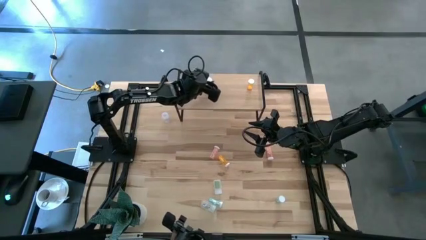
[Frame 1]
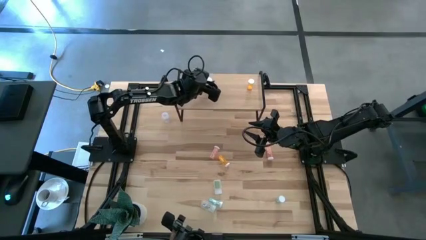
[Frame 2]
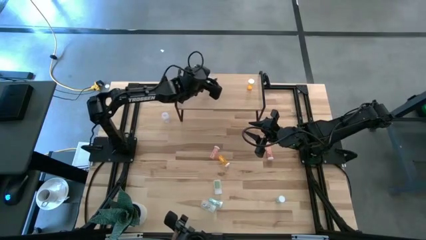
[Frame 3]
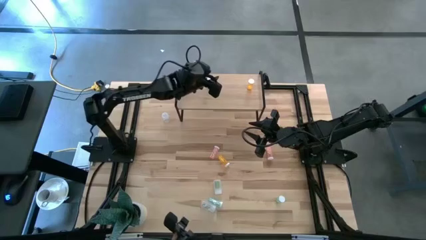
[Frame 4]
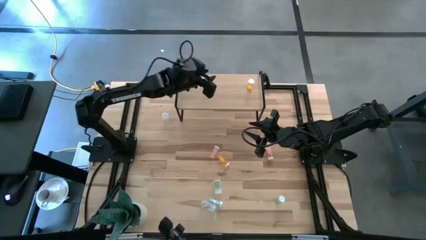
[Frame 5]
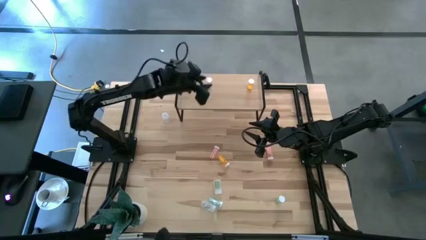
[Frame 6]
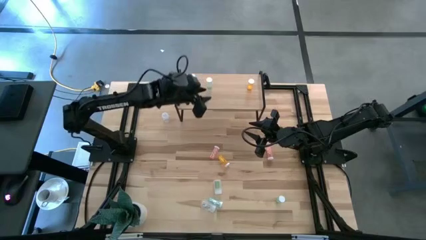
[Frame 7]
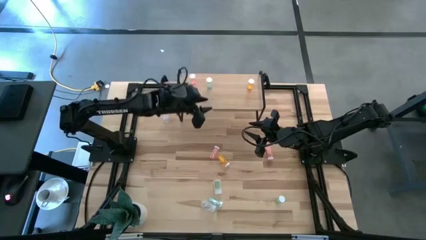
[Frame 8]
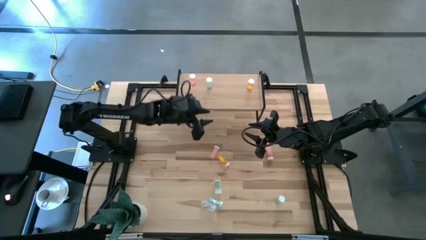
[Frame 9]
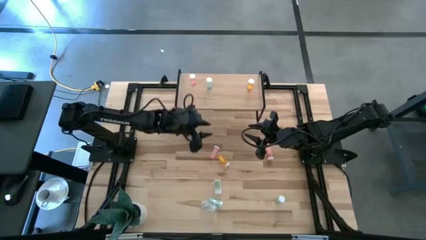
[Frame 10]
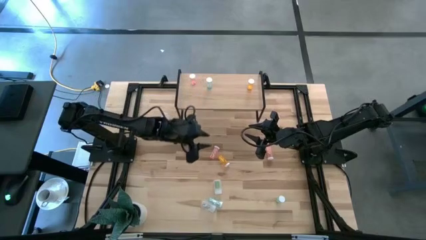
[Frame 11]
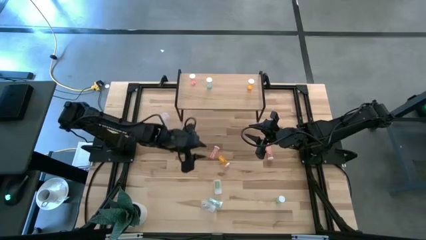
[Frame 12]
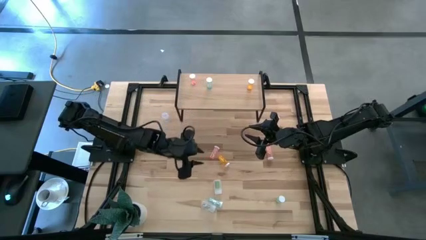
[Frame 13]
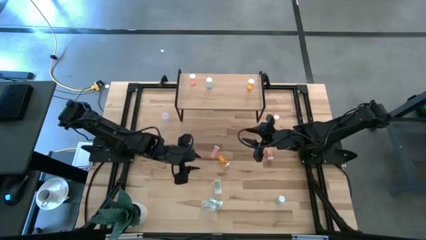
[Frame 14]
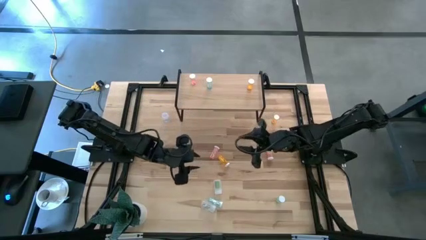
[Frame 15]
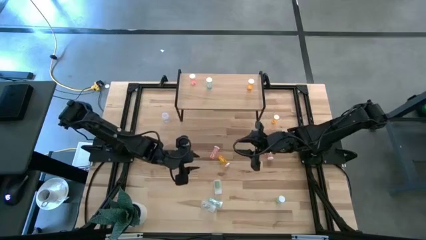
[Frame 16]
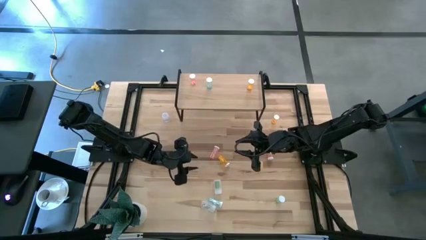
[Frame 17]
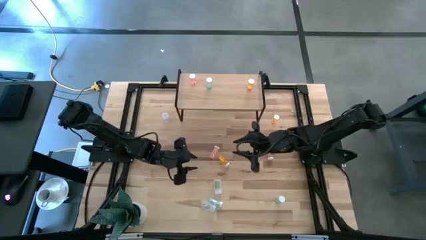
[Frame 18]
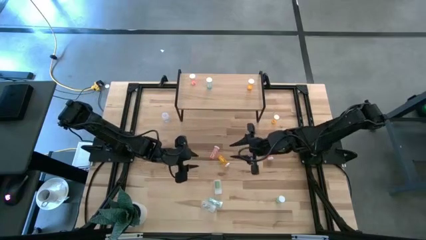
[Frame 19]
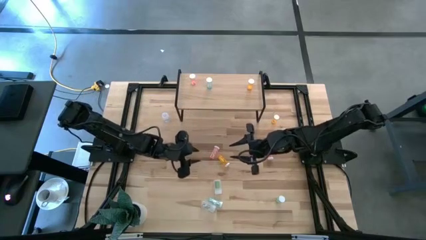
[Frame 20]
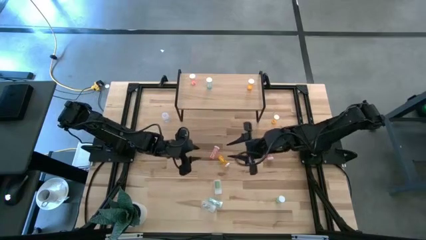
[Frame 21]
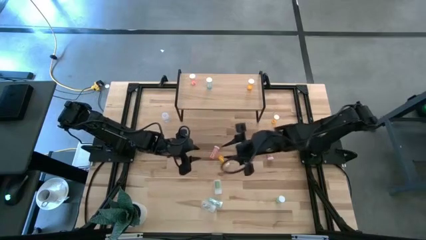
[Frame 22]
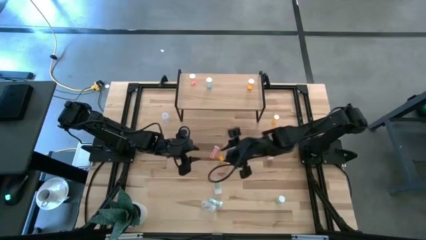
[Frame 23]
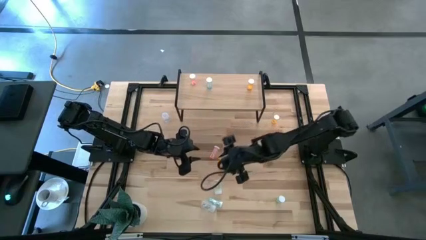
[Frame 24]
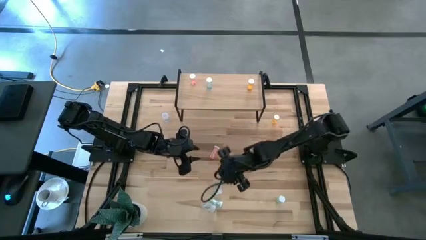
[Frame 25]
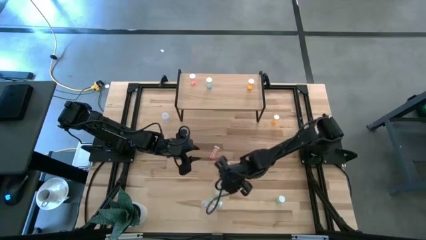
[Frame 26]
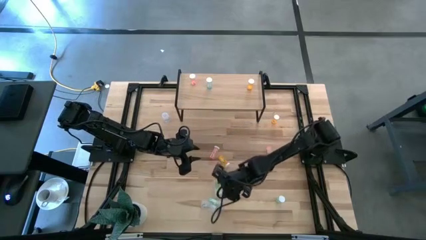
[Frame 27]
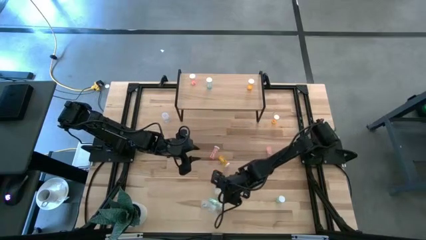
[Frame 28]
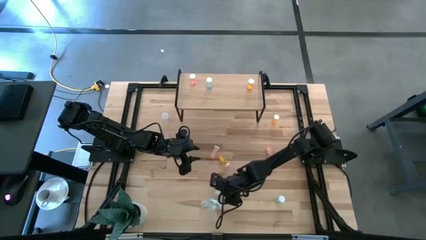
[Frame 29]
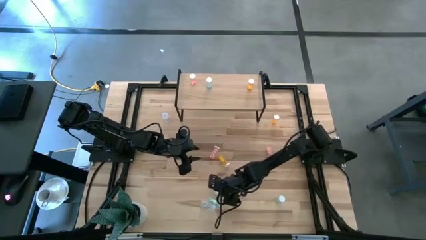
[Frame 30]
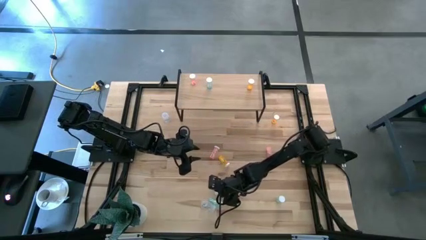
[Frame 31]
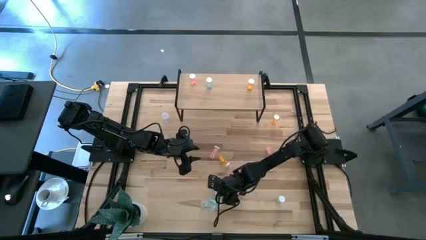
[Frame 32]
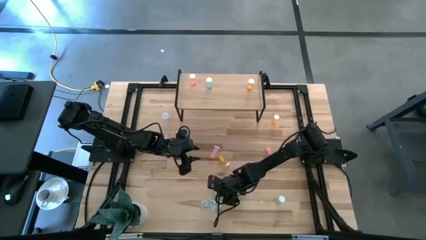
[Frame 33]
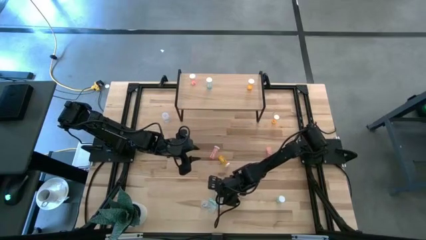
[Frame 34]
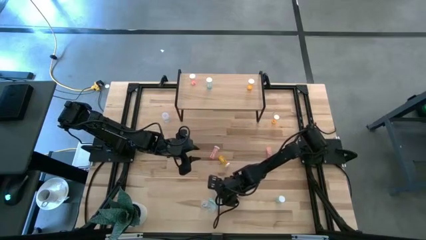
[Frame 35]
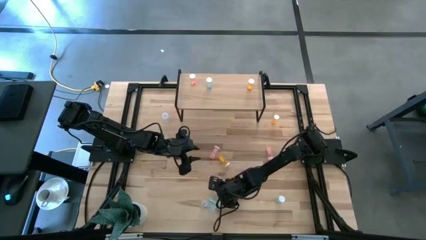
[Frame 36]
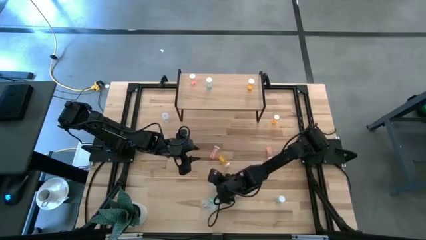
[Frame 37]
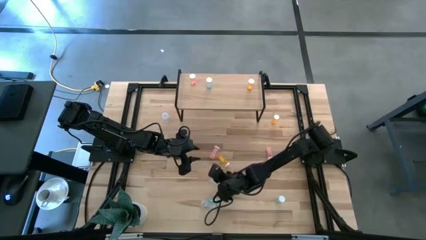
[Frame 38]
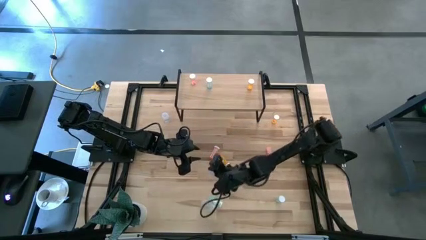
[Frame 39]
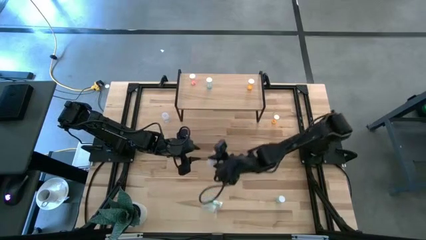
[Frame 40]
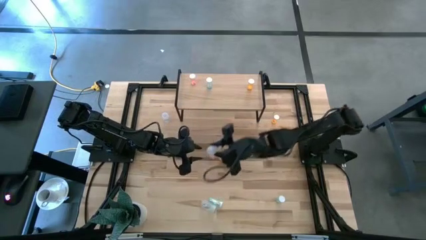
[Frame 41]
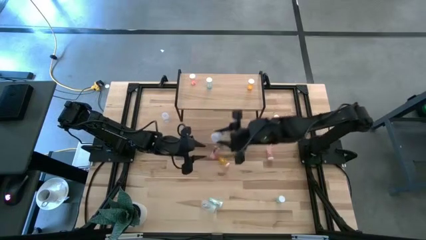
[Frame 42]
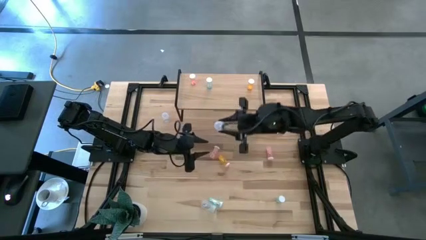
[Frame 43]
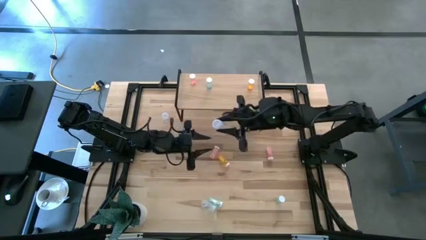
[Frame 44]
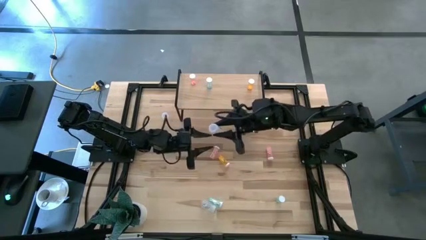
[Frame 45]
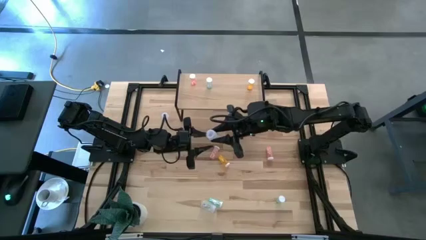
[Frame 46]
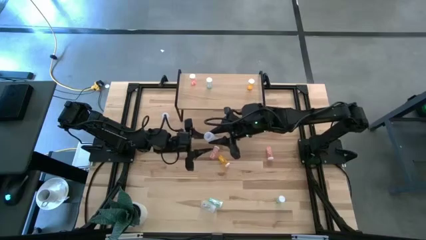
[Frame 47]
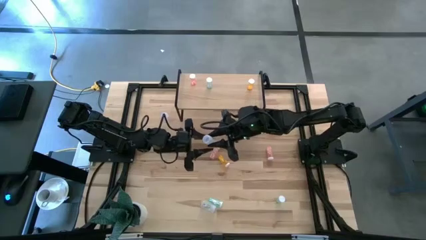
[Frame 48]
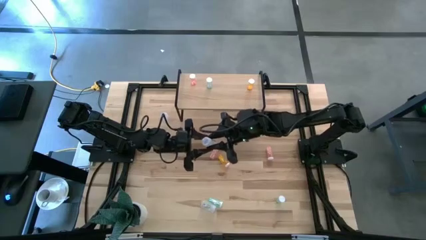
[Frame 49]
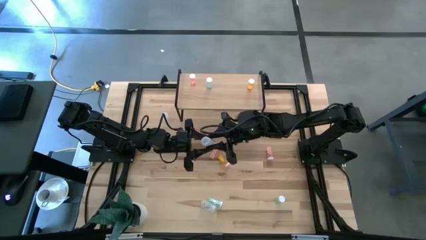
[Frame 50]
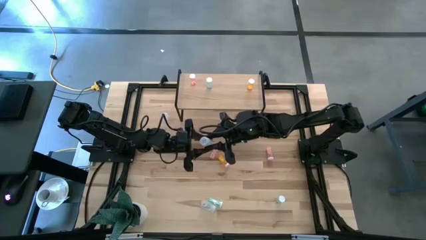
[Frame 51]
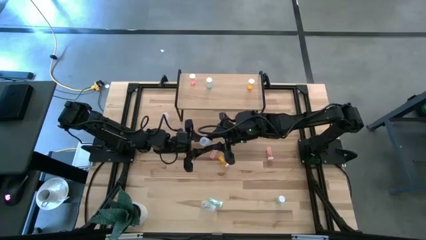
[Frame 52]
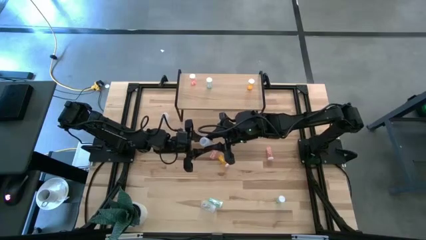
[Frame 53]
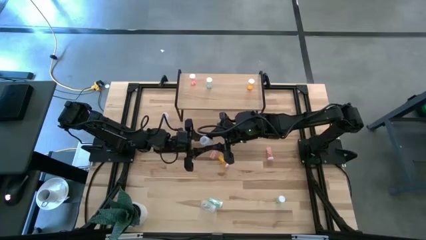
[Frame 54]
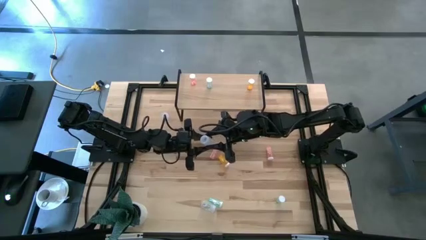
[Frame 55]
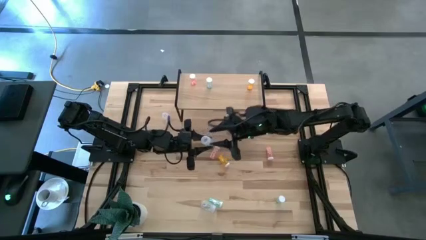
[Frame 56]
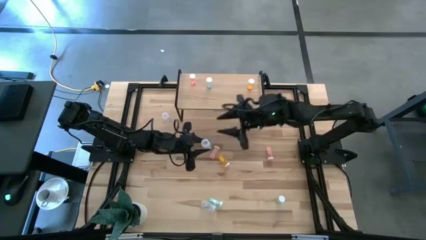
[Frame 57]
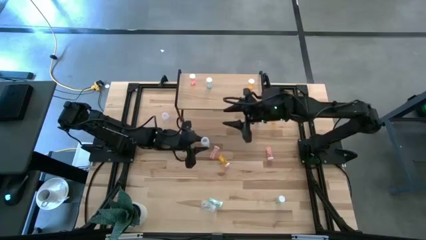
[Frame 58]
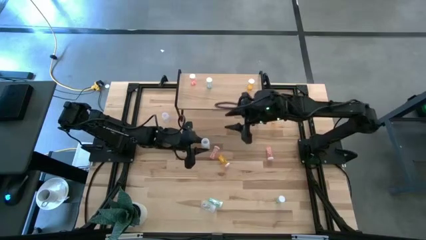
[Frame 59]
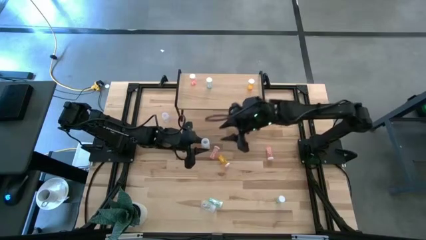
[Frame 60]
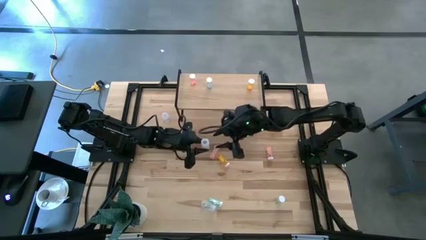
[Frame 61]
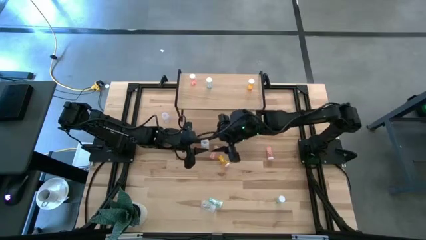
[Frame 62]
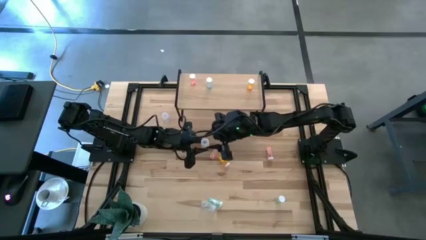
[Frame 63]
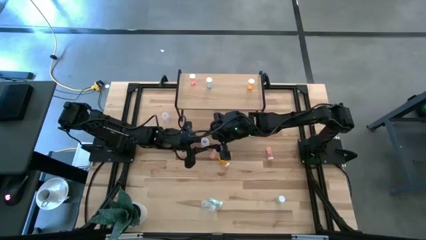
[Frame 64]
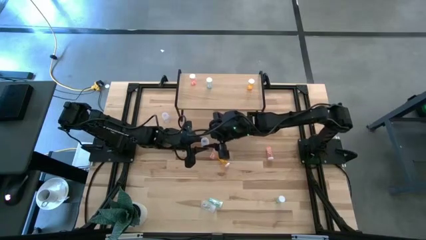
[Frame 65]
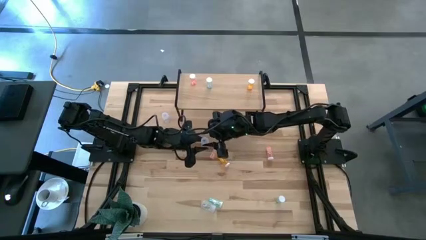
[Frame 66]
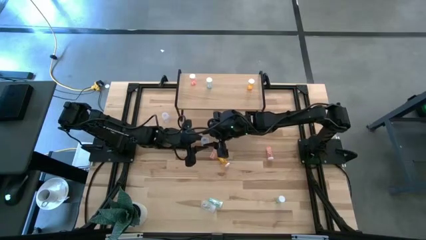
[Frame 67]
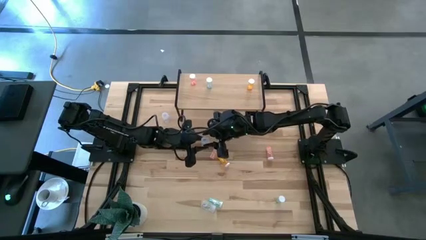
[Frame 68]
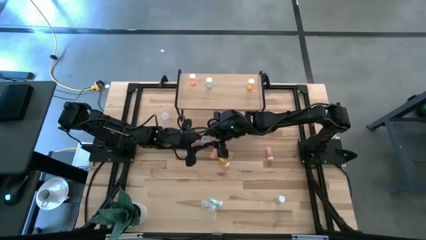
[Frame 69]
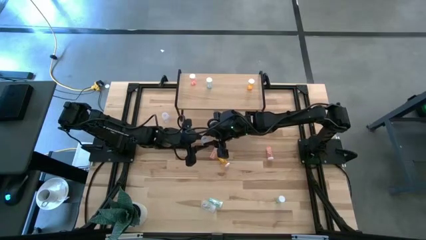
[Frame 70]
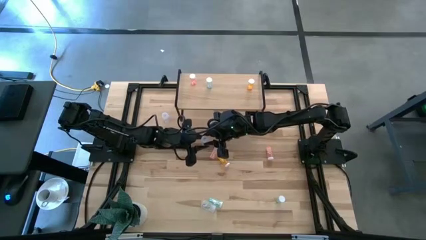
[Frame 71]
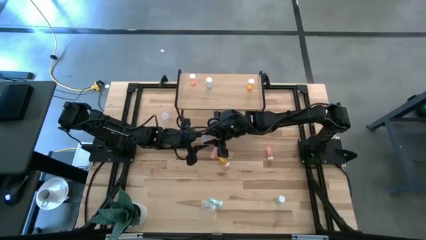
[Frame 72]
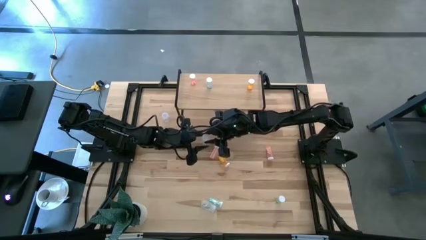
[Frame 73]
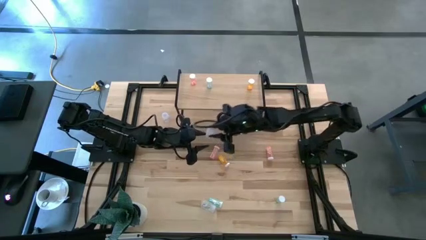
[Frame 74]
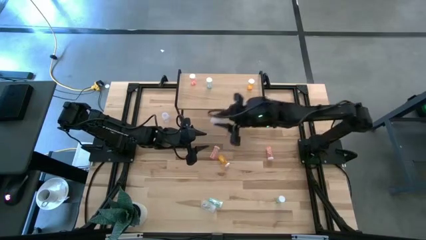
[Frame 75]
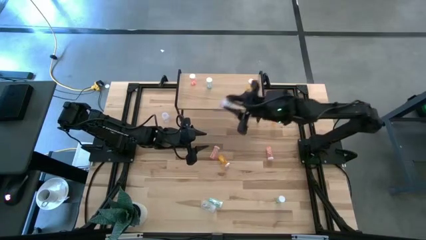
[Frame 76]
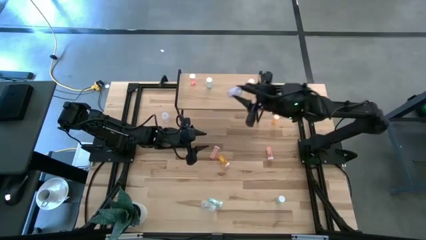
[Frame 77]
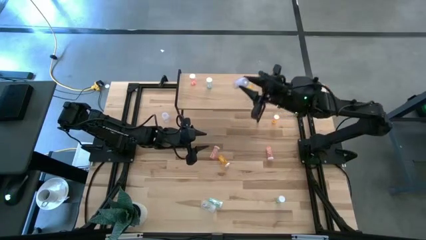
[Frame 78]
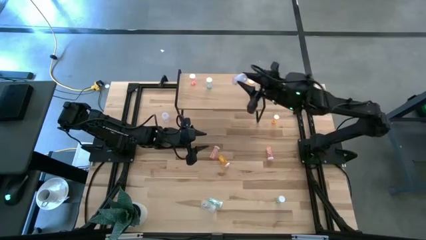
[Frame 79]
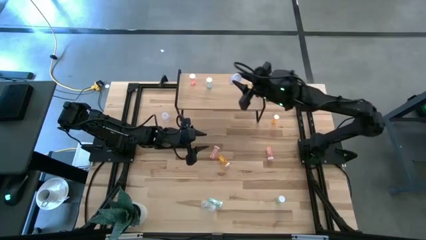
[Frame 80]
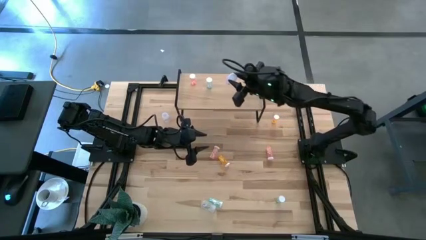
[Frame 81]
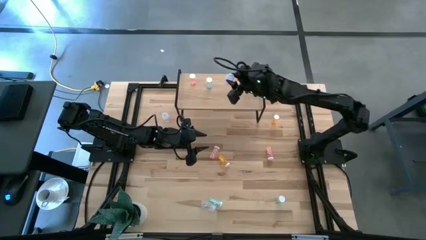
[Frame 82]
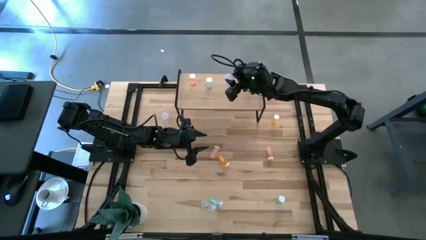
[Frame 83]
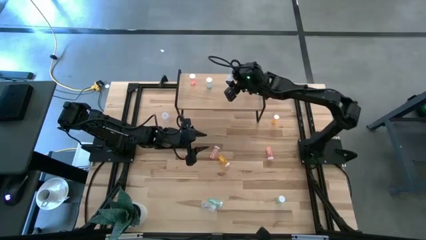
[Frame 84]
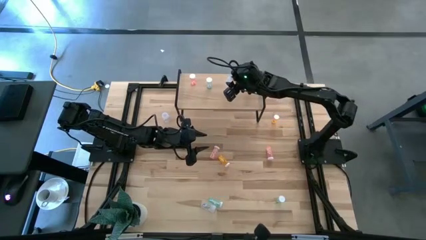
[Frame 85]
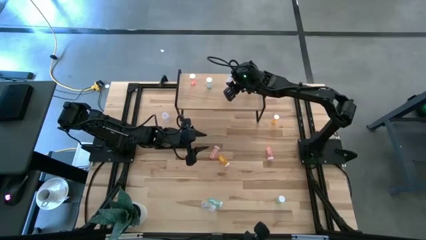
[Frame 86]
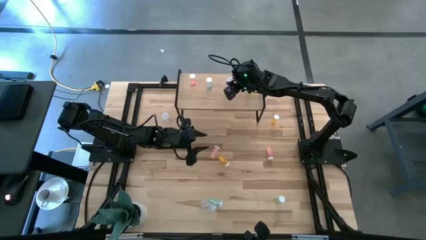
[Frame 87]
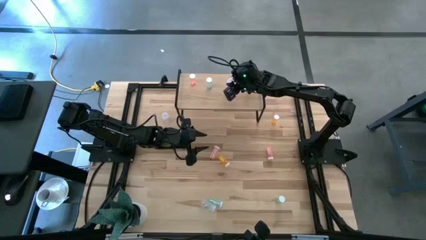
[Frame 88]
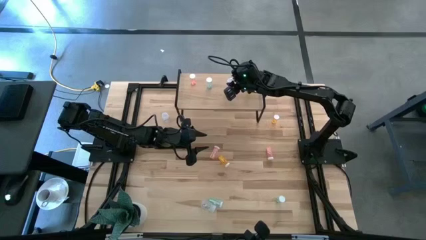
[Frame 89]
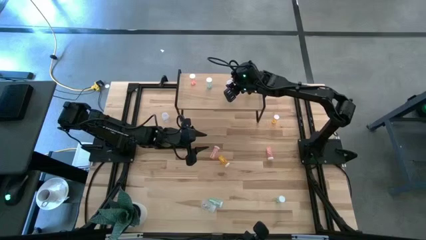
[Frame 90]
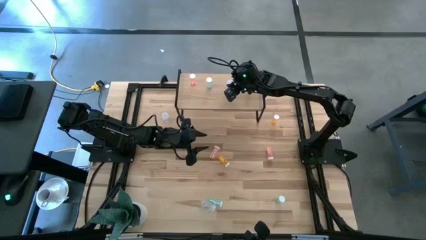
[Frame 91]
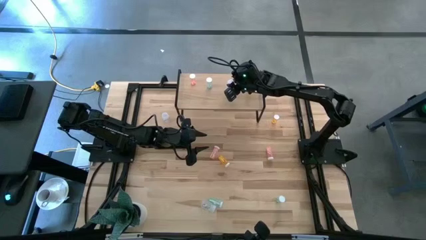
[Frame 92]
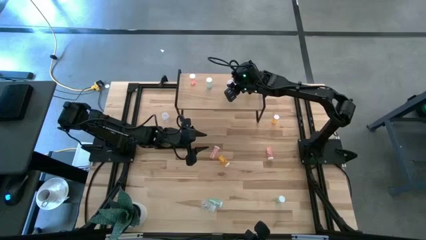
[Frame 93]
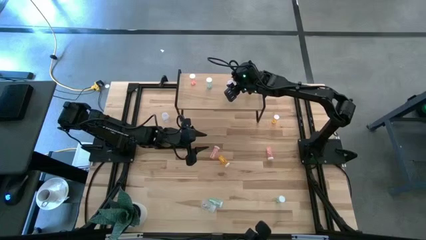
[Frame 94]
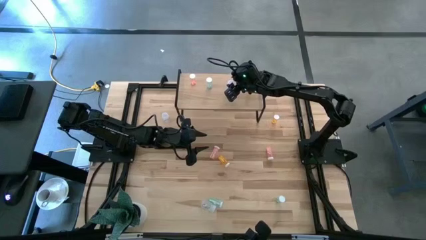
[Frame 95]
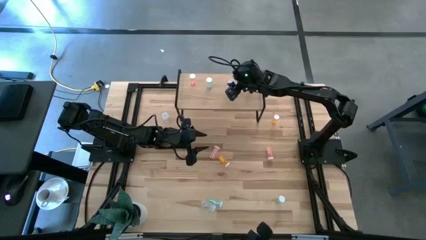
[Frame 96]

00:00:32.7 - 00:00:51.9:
Task: Pick and place medicine bottles onto shelf by color
Put the middle transparent pill bottle on the shelf
